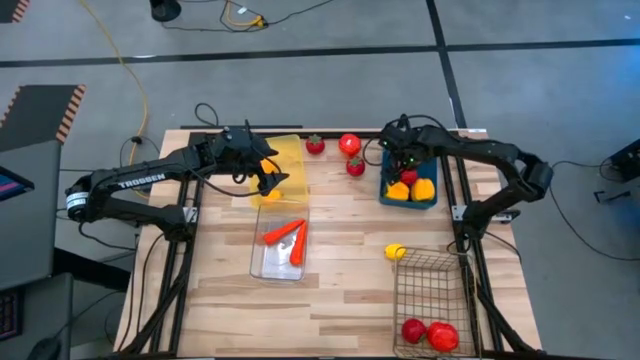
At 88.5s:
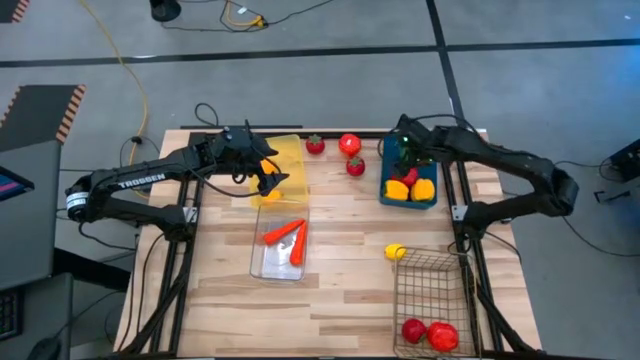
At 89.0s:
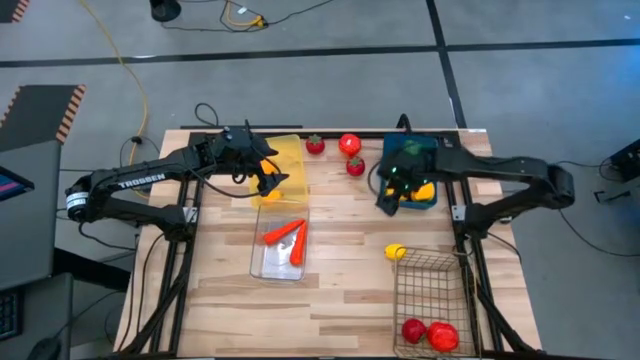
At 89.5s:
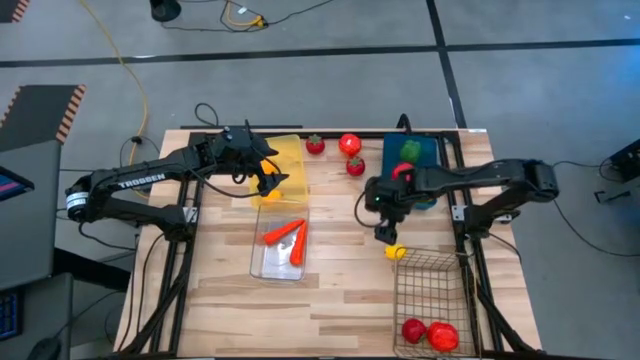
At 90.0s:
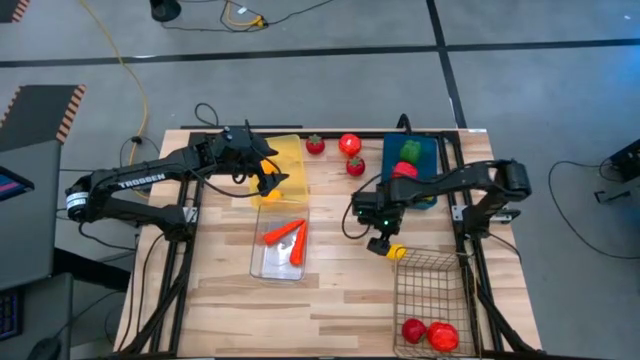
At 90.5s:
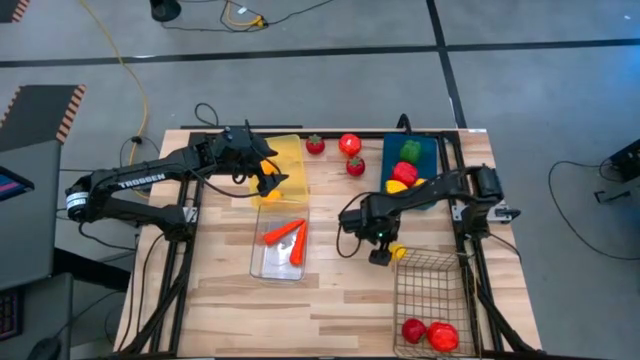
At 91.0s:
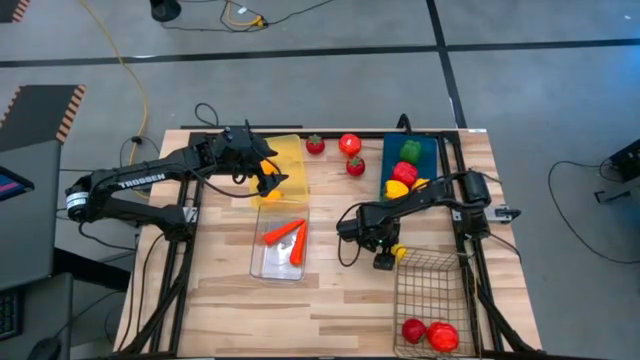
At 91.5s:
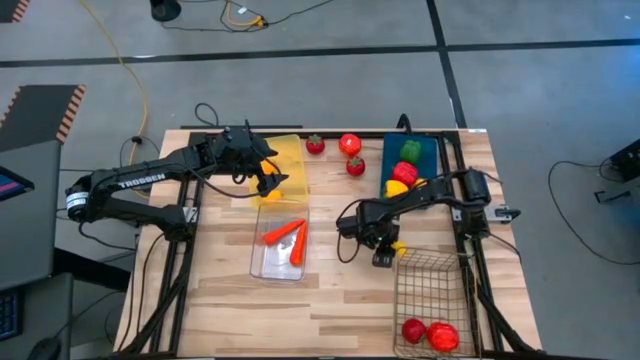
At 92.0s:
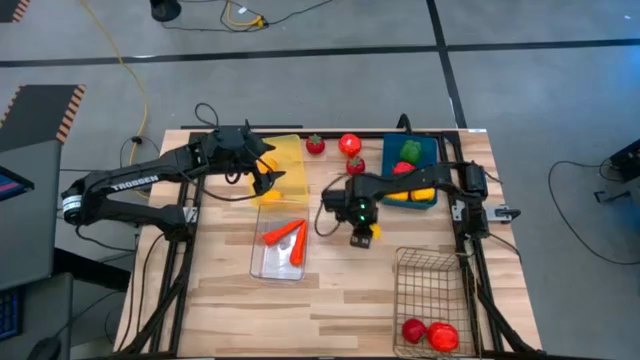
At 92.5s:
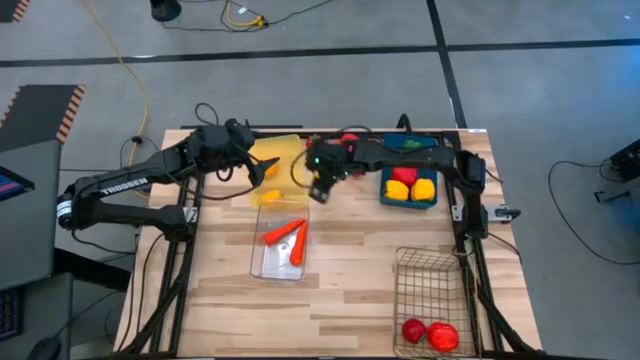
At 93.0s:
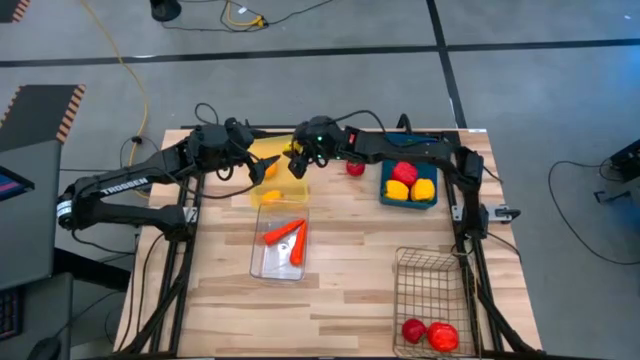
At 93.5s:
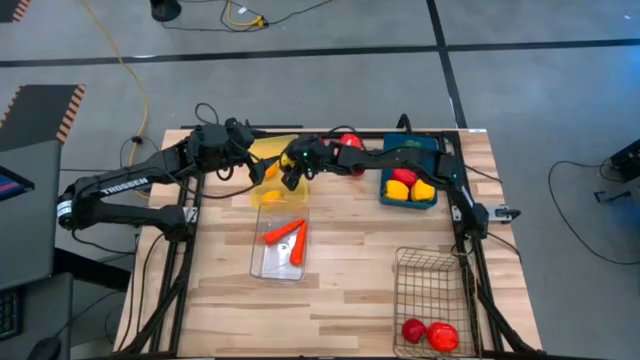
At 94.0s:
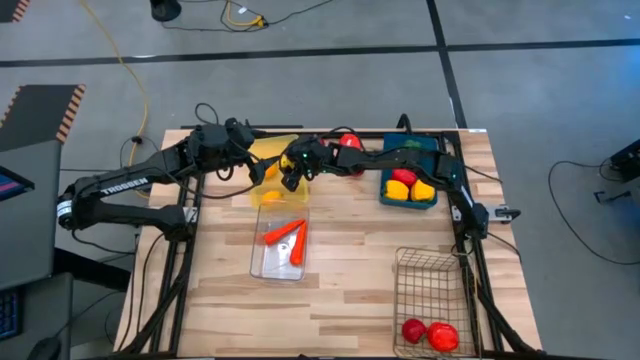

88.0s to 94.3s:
Task: Sort produce into baskets
Put the yellow lemon into the yellow bin

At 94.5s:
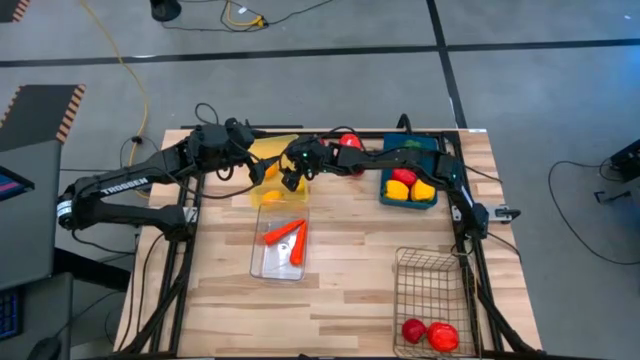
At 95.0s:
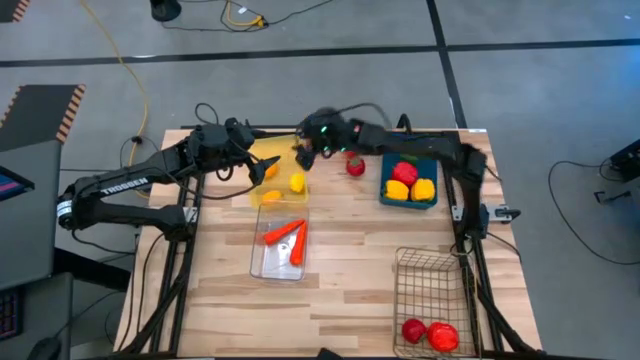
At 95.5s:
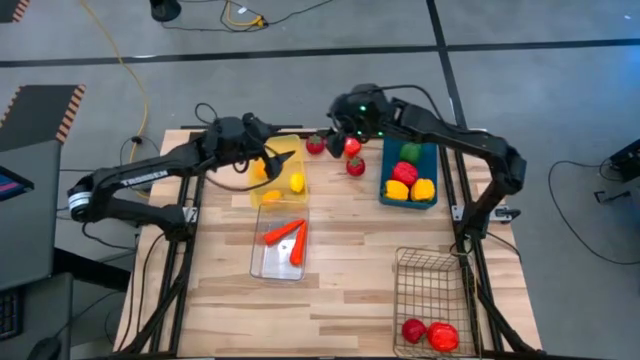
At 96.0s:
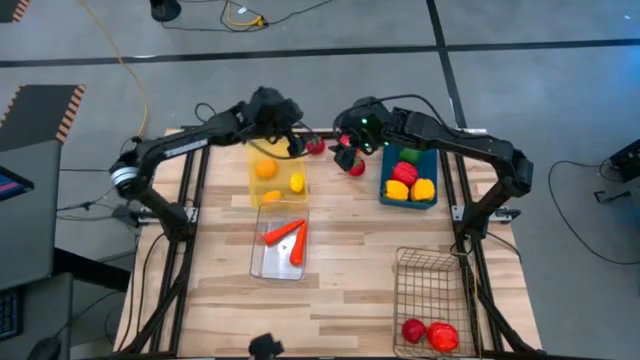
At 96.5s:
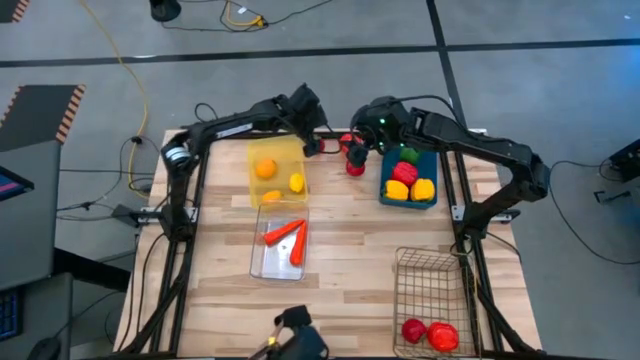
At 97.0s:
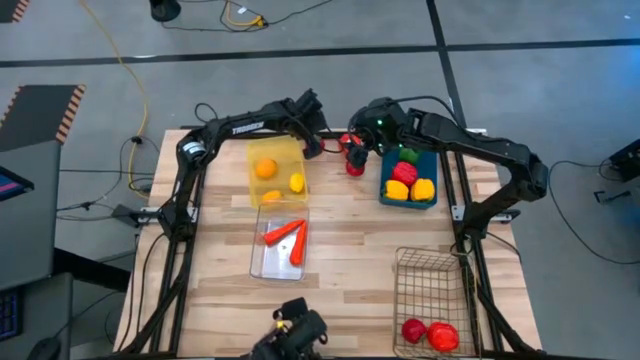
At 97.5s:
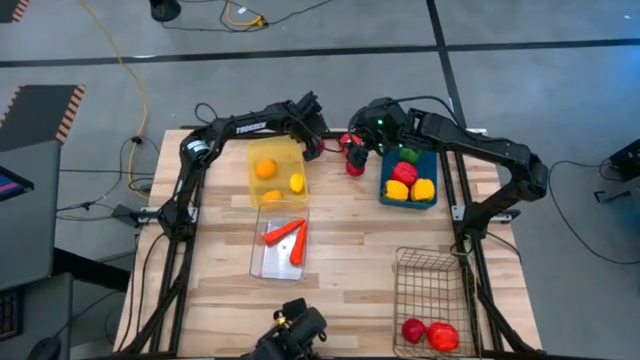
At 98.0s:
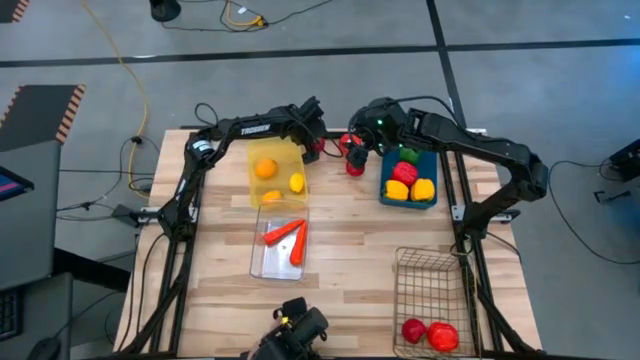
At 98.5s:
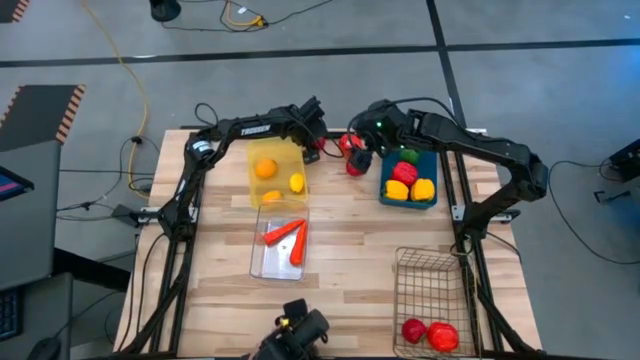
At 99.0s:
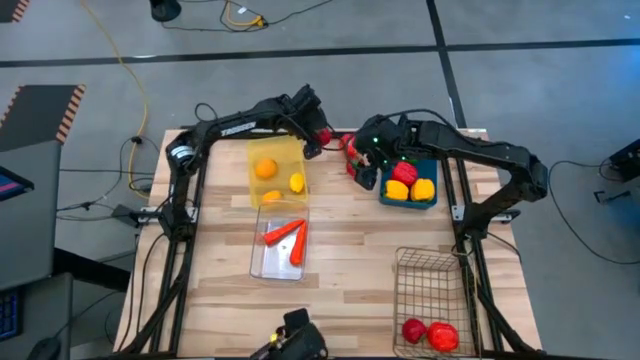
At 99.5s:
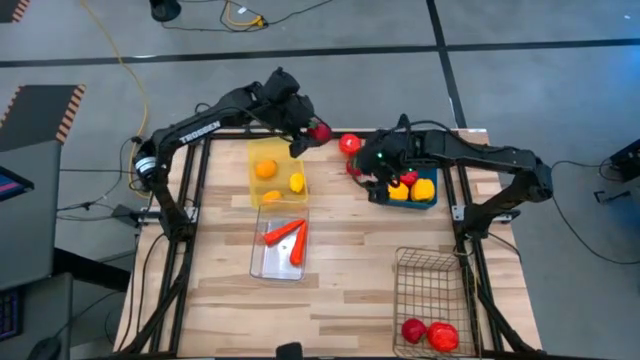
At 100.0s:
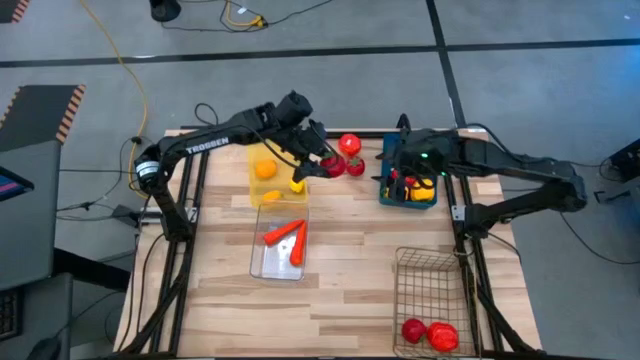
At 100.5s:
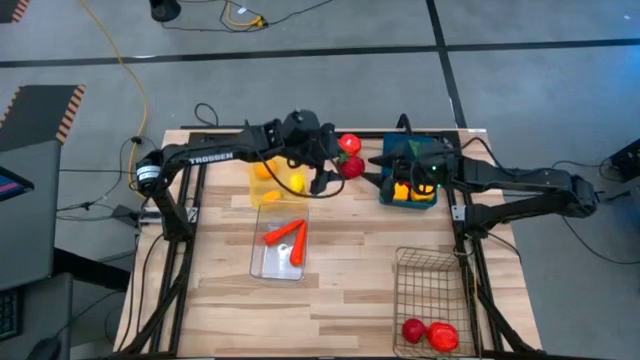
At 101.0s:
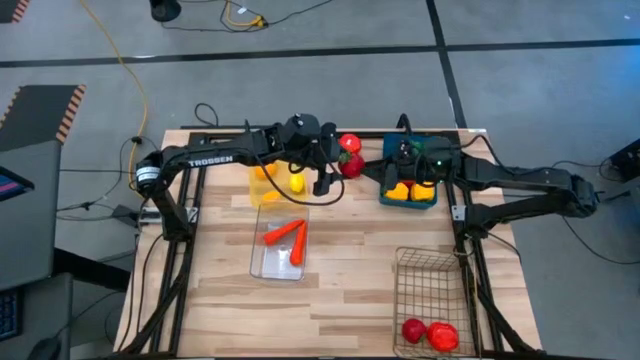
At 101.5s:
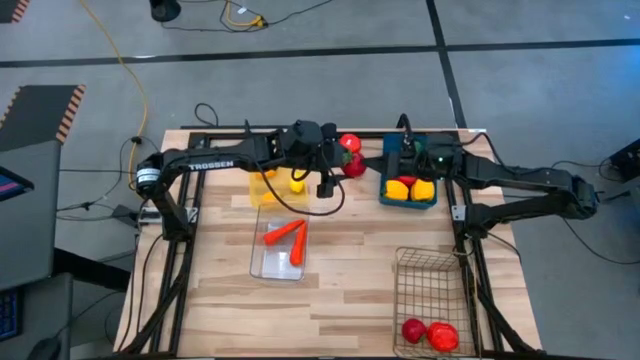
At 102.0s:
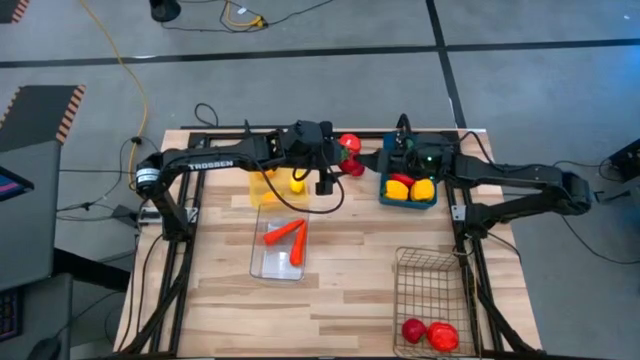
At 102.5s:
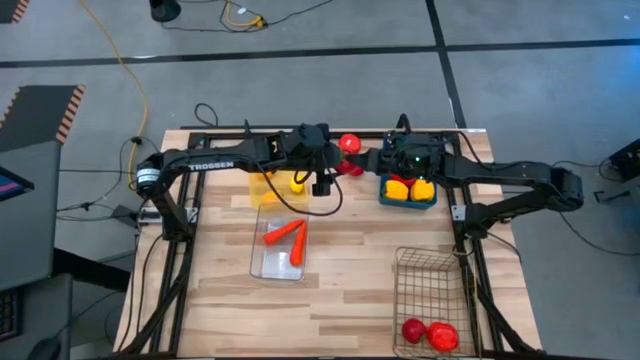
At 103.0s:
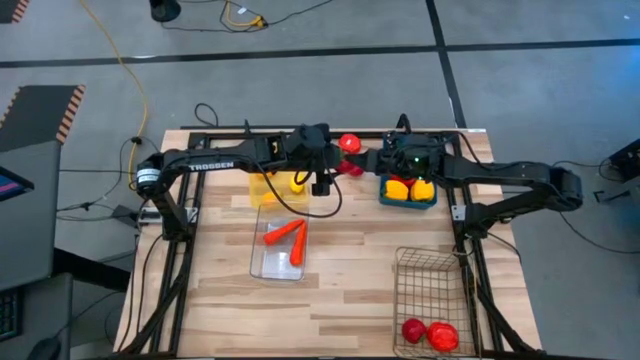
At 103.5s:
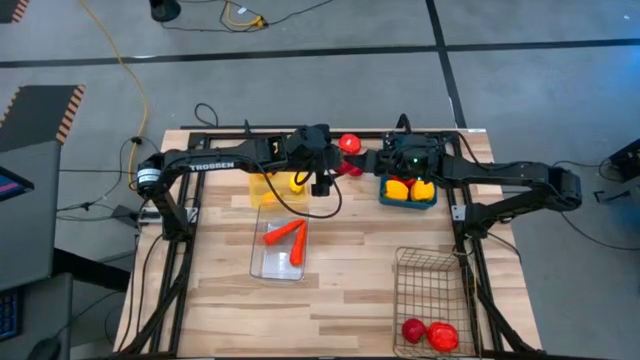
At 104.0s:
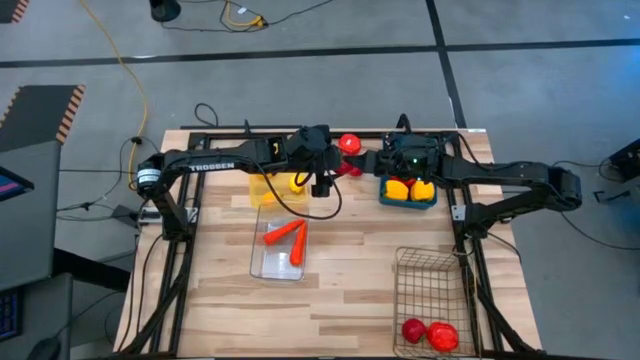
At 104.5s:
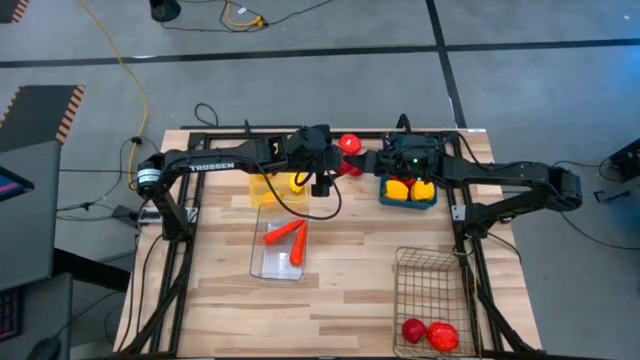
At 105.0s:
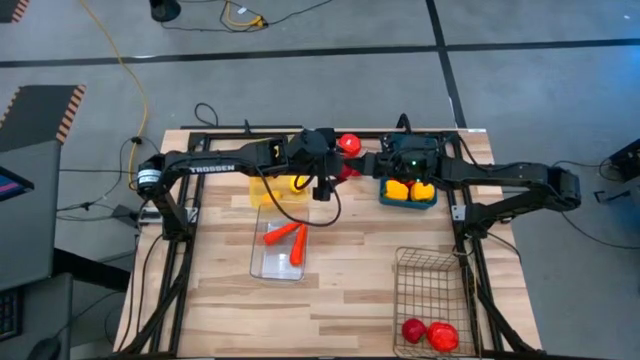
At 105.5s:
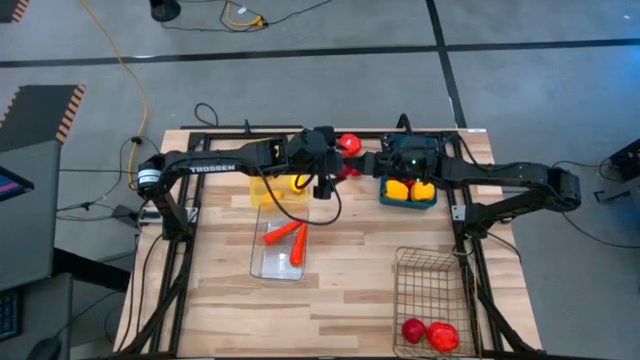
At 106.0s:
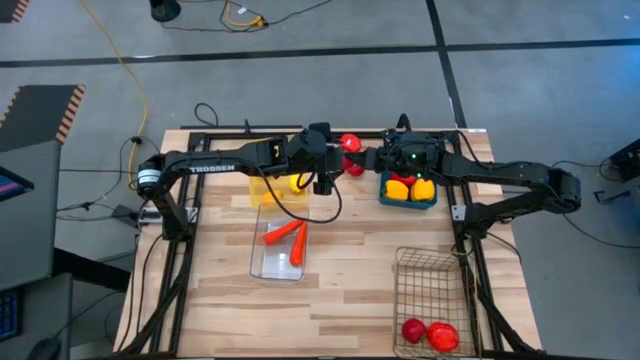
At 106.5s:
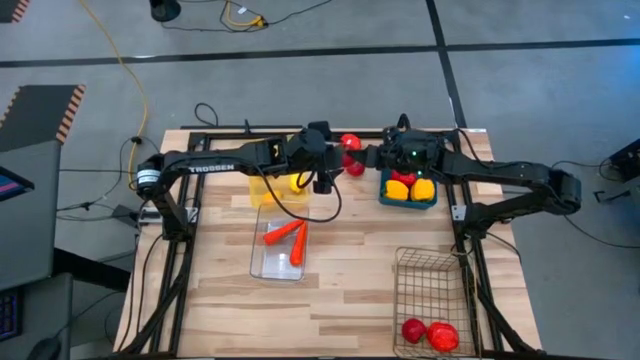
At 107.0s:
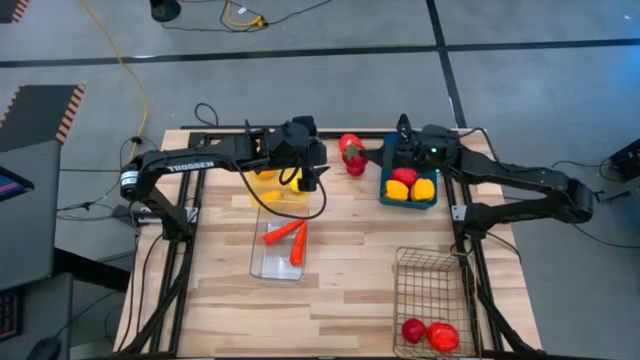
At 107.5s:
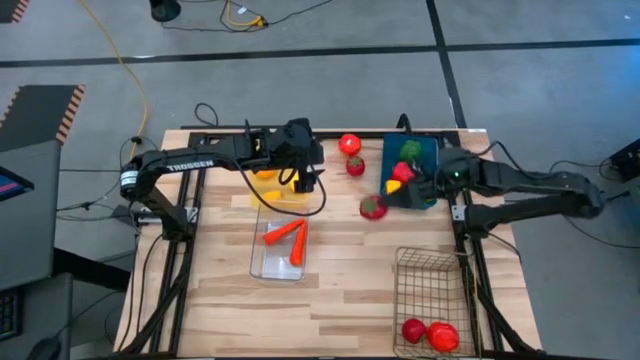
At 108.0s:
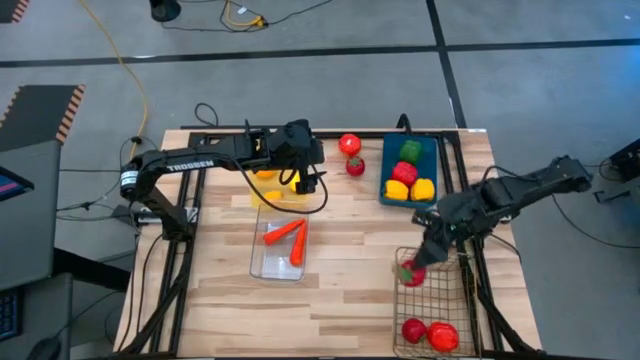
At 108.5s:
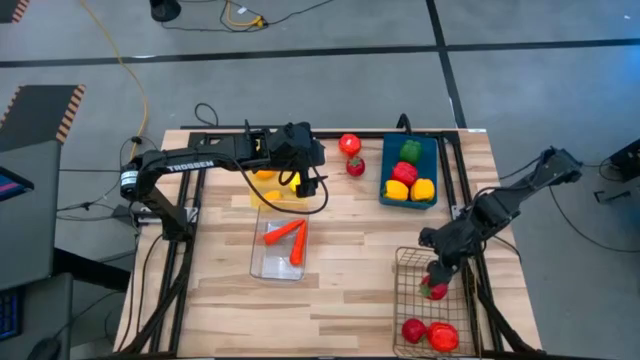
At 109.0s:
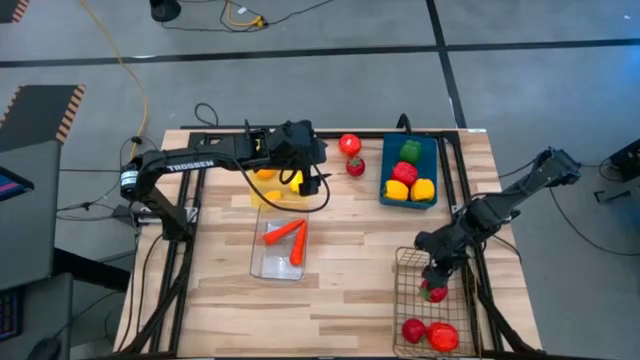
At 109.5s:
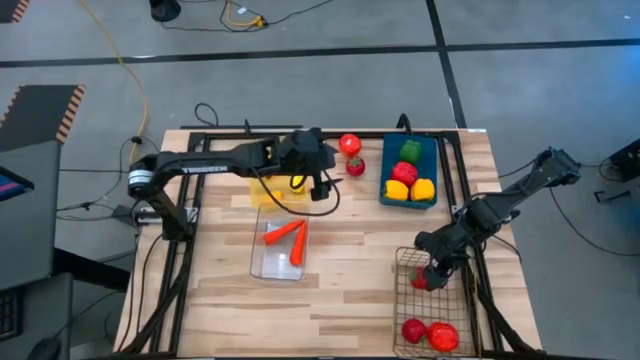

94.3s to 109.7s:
Put the top red tomato into the wire basket
